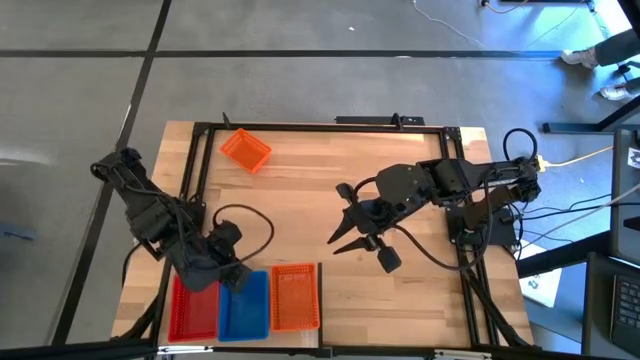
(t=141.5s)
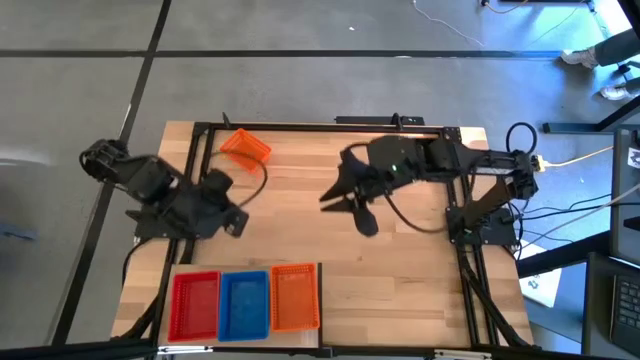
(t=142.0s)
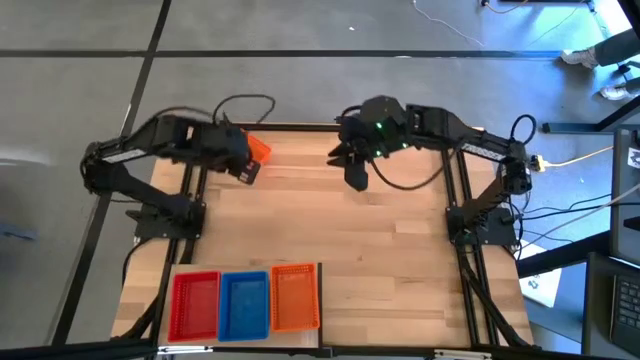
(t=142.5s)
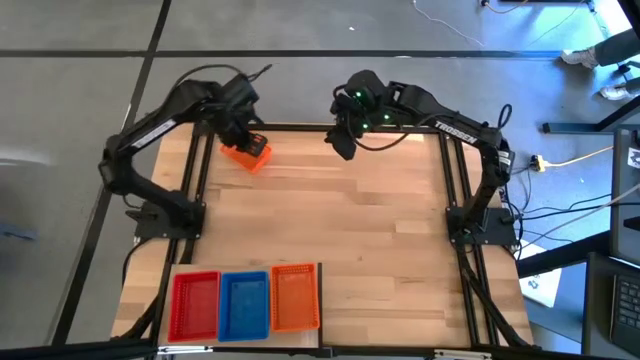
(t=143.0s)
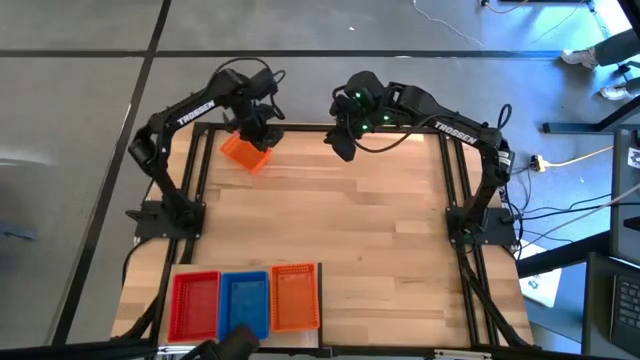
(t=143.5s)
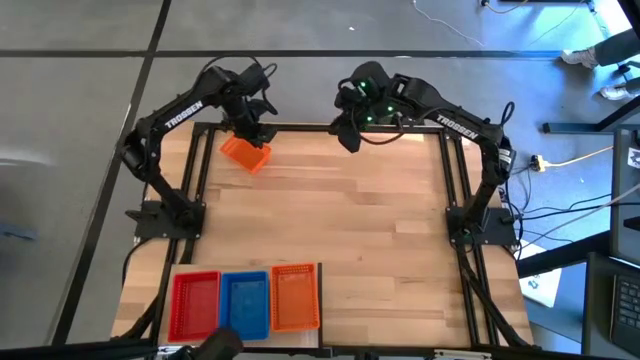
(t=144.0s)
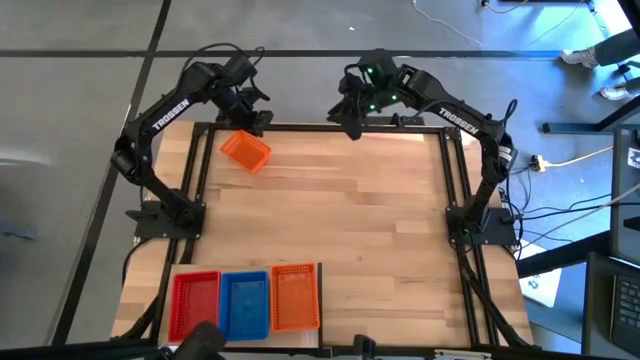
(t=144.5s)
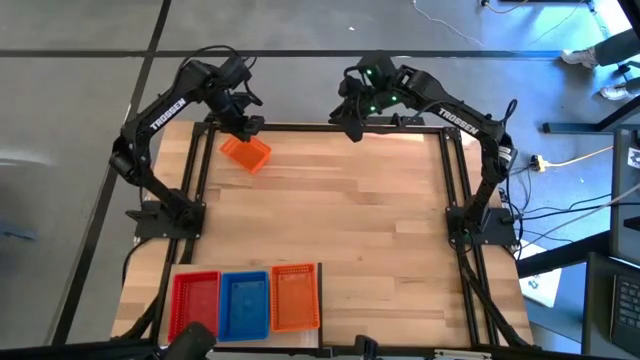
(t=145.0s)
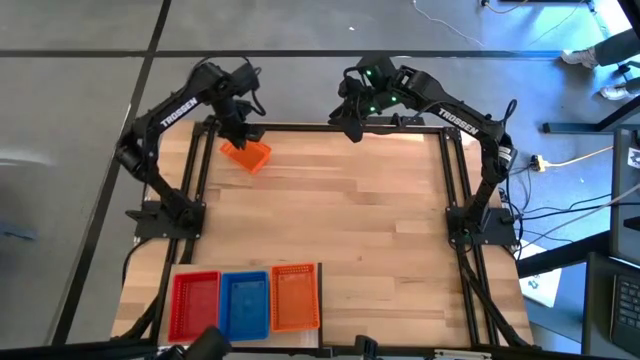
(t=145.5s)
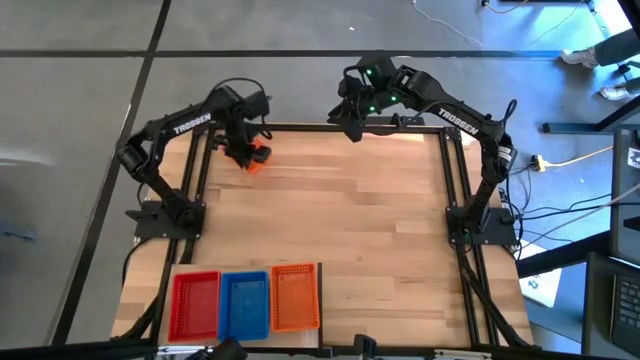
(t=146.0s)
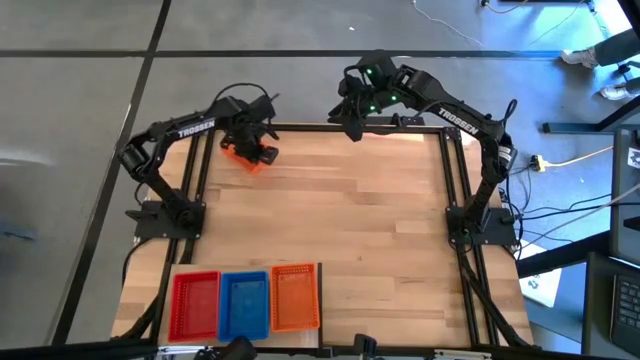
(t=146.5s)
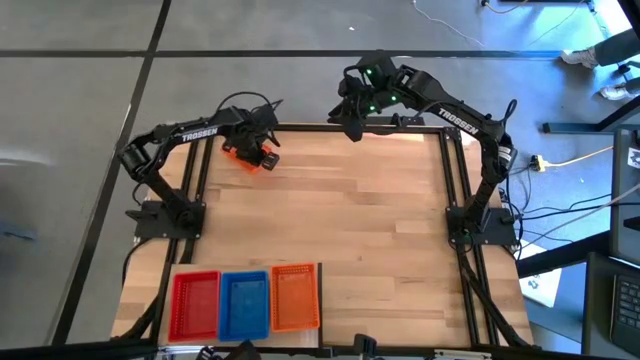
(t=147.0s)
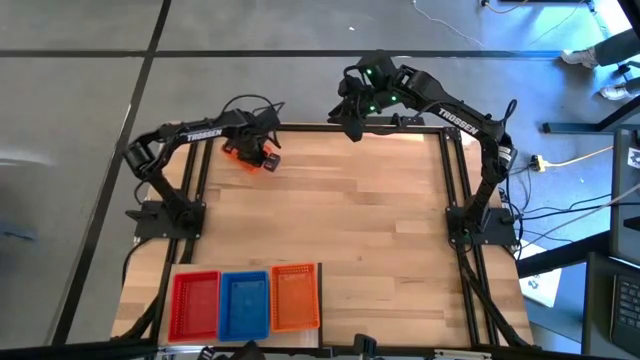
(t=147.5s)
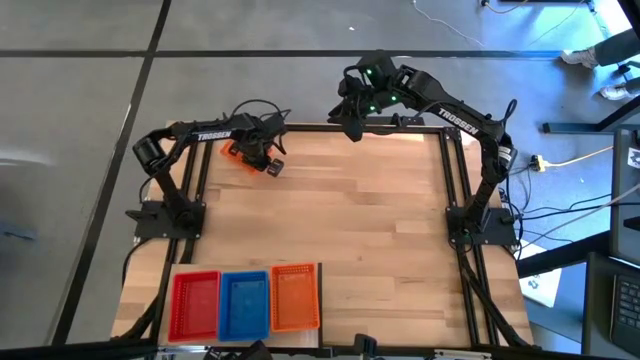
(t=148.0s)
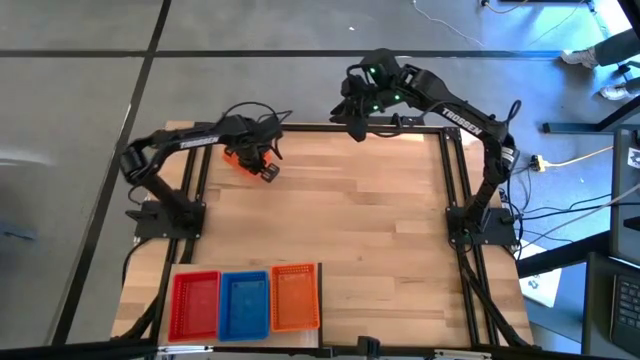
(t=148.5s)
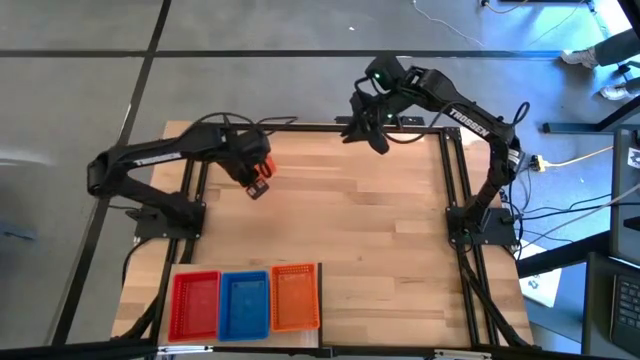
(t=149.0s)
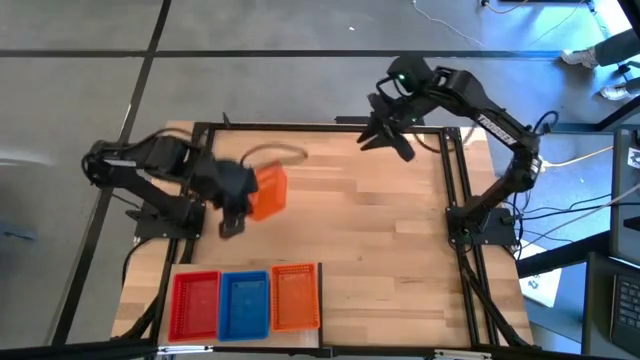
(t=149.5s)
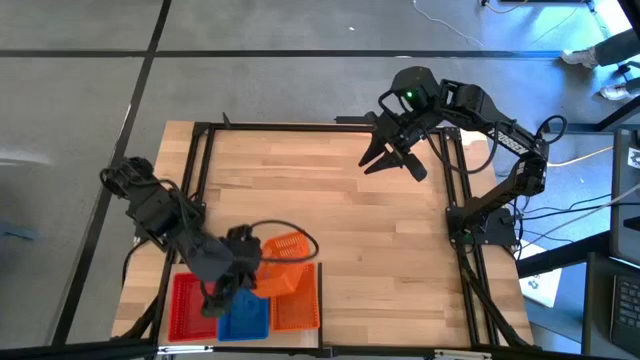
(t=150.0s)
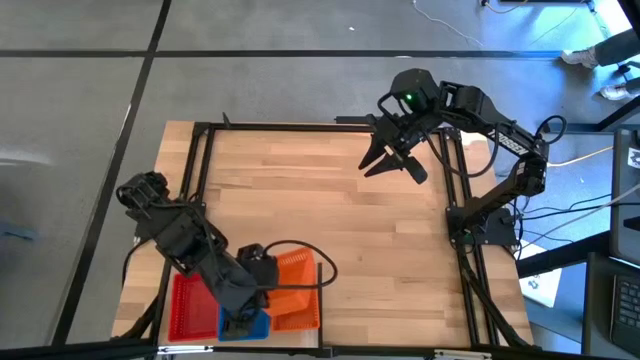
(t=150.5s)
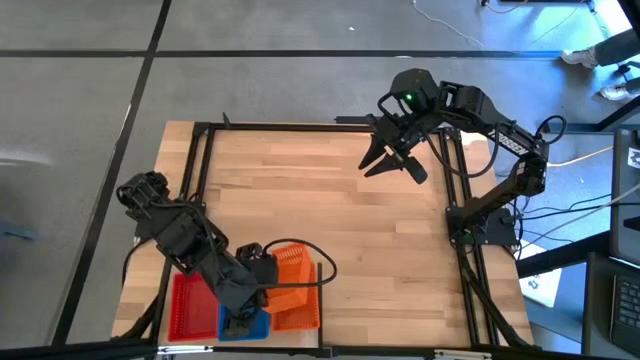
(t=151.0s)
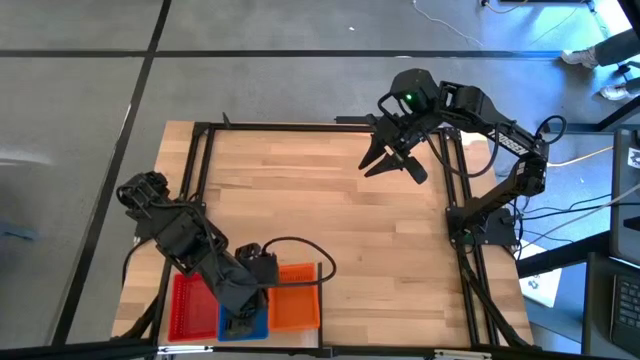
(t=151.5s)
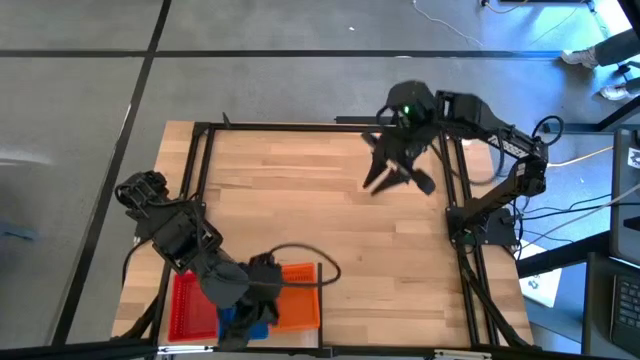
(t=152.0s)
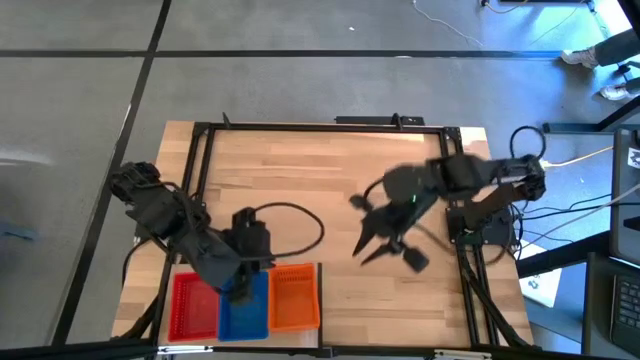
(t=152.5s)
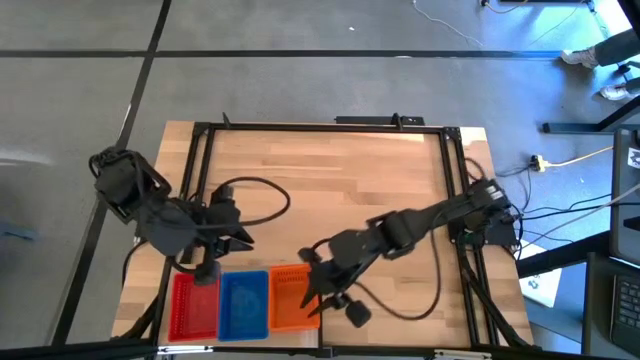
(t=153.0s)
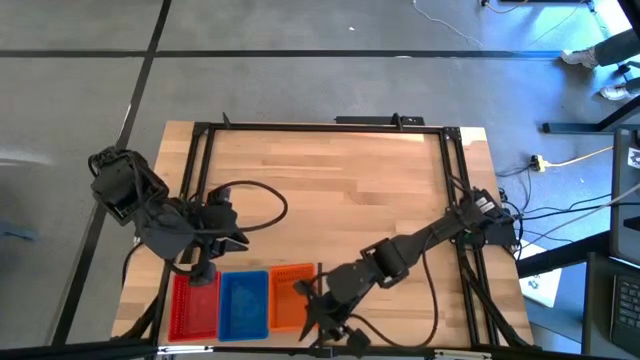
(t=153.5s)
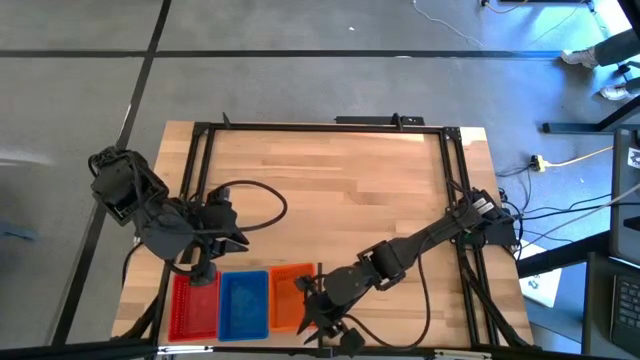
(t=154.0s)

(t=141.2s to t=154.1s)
Task: Stack baskets on shelf by color
Stack the orange bin on top of the other orange bin on the shelf

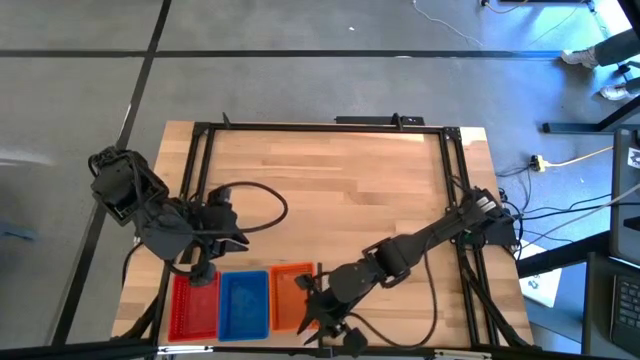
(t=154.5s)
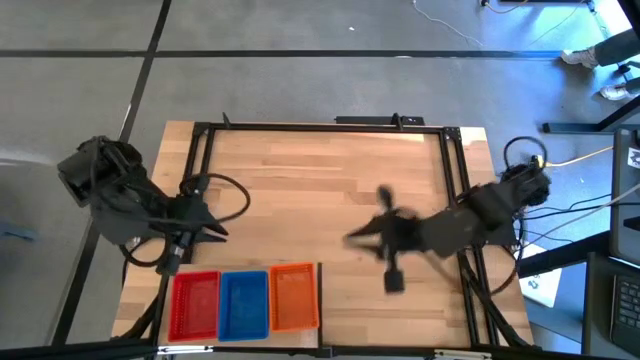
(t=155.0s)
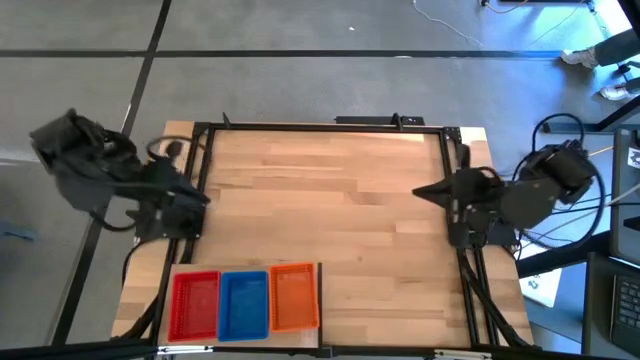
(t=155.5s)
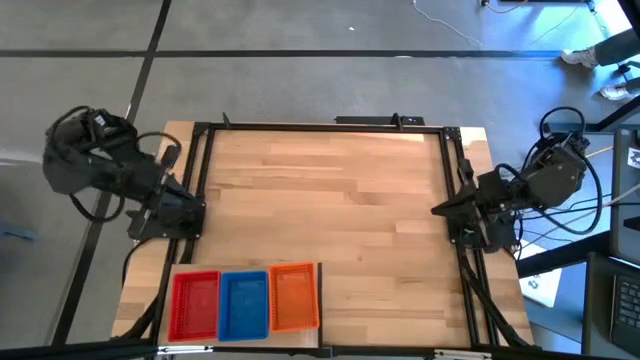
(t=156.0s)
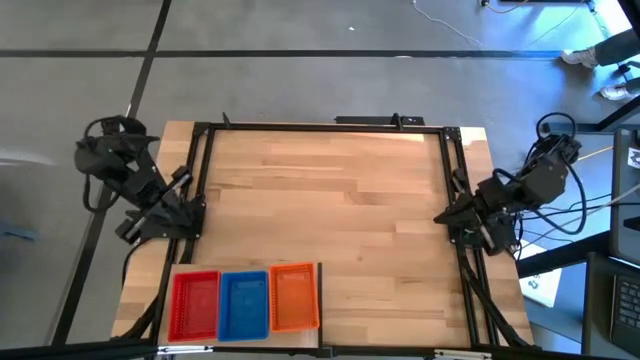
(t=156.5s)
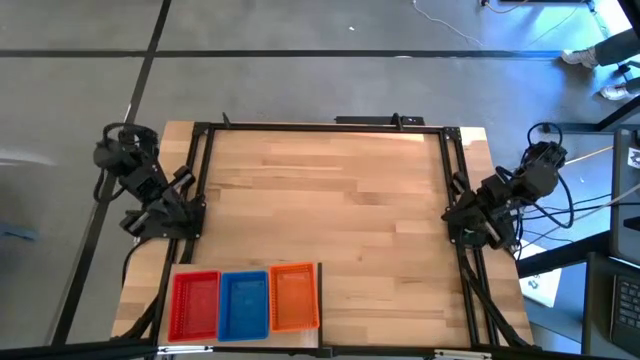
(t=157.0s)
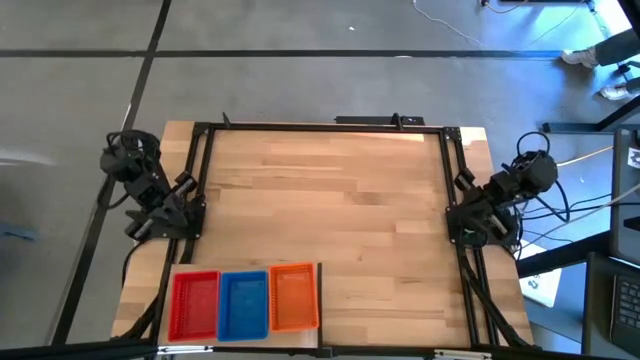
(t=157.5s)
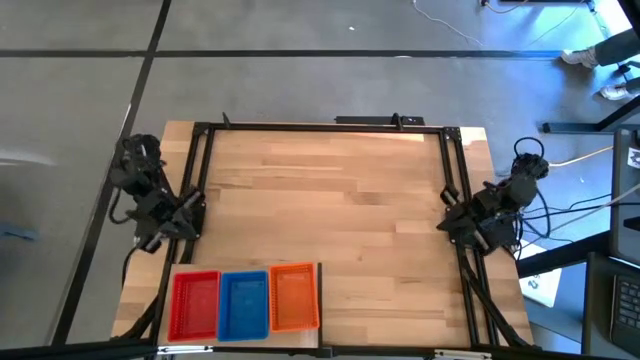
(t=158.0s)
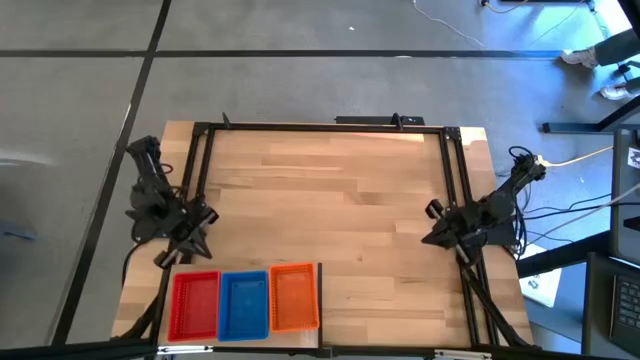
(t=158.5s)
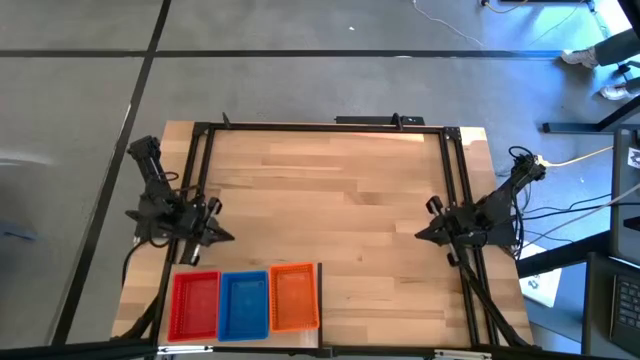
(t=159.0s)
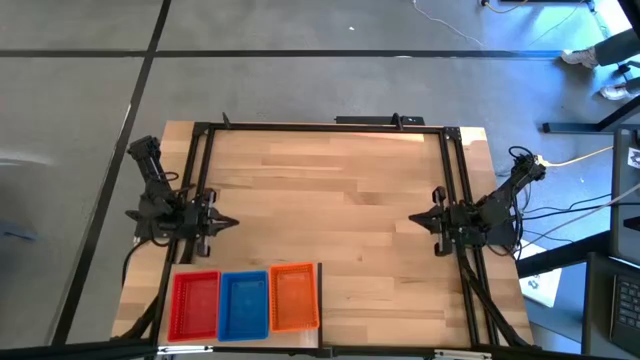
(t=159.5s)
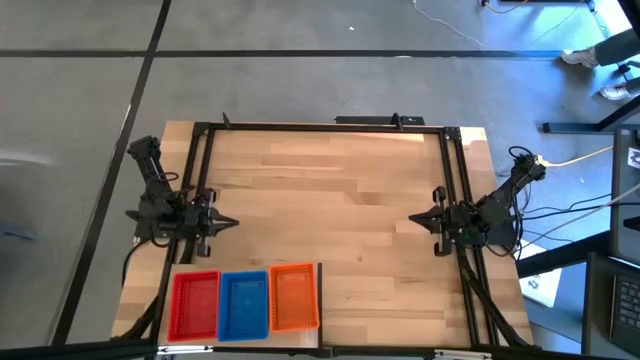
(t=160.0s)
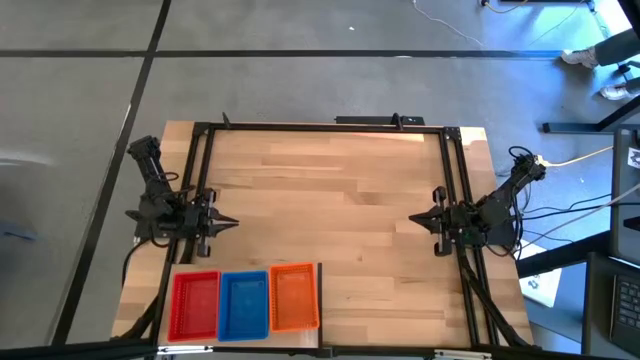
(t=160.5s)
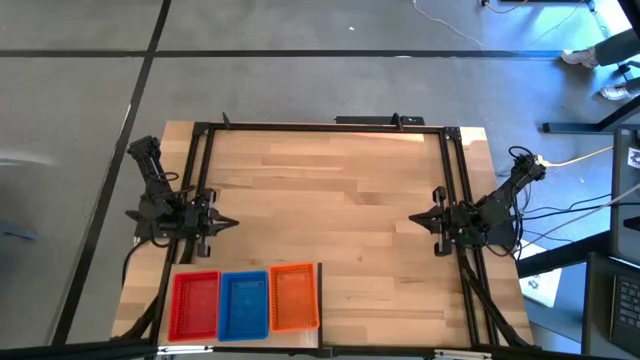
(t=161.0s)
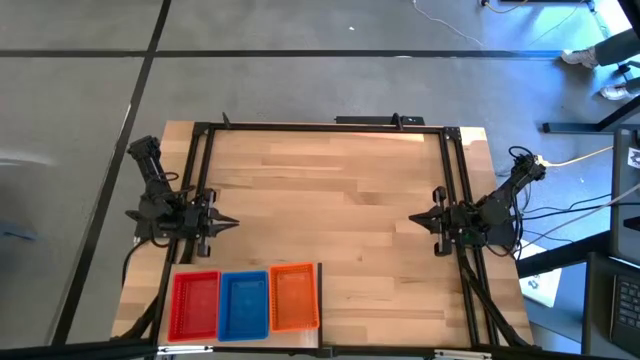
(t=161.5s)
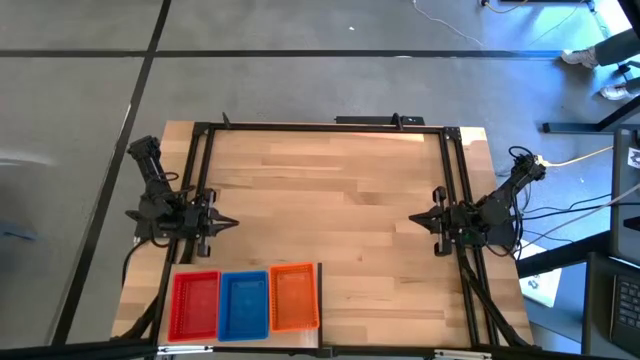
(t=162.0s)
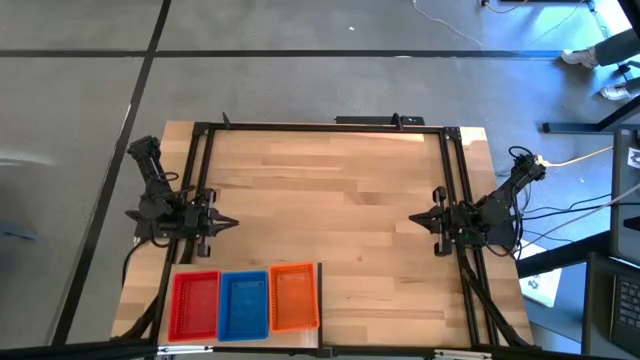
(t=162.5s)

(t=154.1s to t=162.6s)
Return to Home Position
